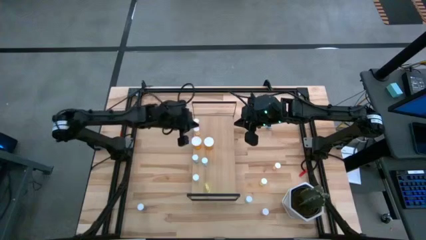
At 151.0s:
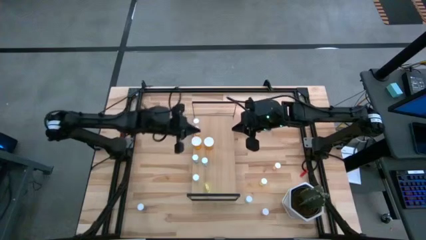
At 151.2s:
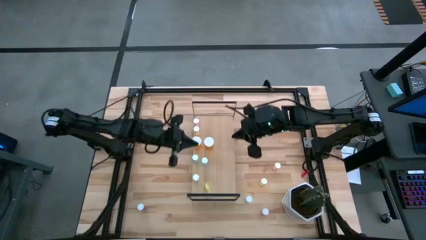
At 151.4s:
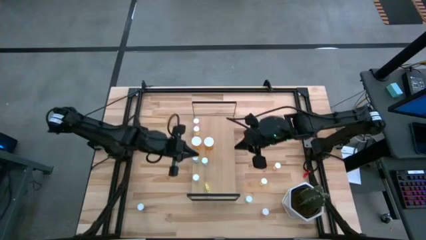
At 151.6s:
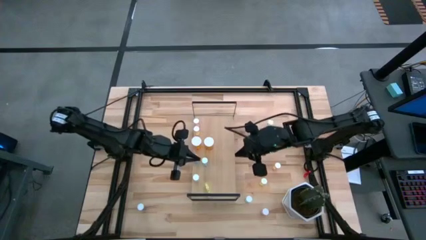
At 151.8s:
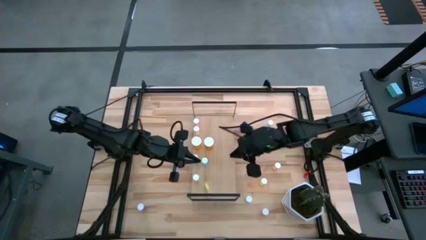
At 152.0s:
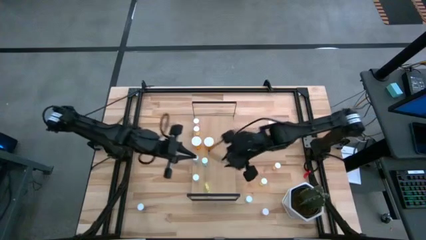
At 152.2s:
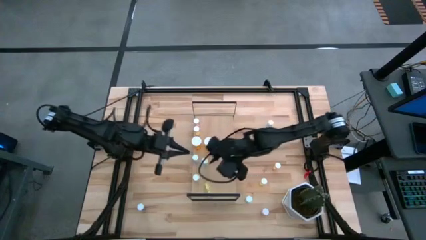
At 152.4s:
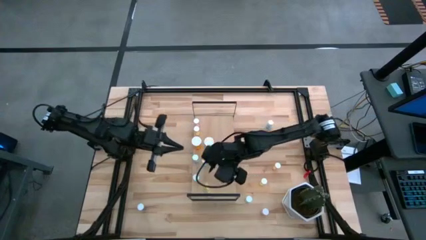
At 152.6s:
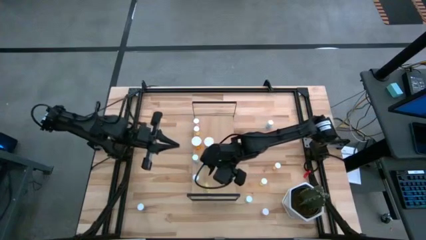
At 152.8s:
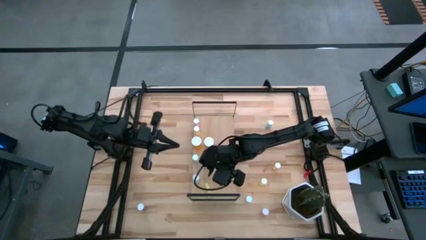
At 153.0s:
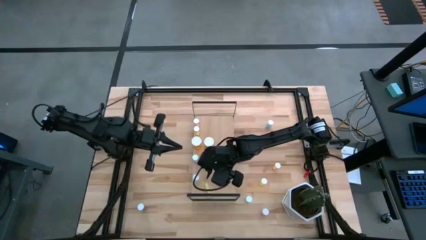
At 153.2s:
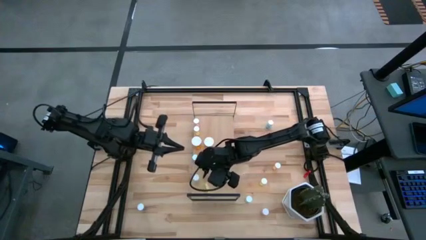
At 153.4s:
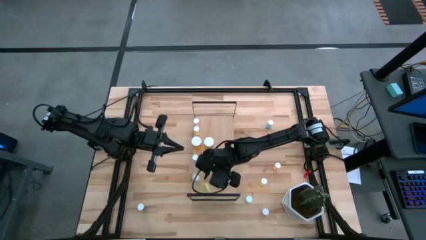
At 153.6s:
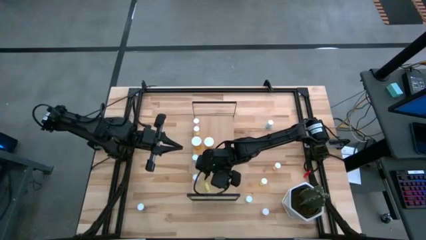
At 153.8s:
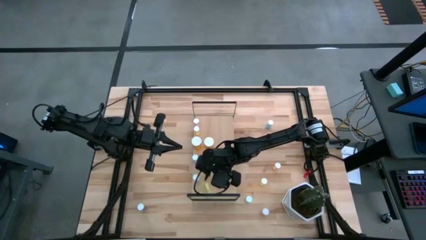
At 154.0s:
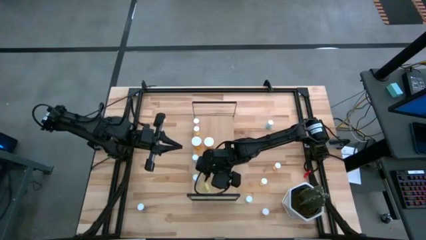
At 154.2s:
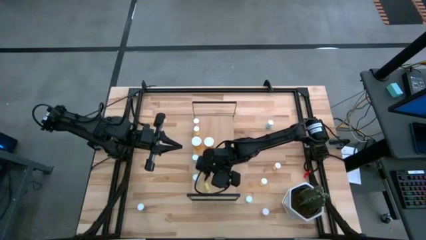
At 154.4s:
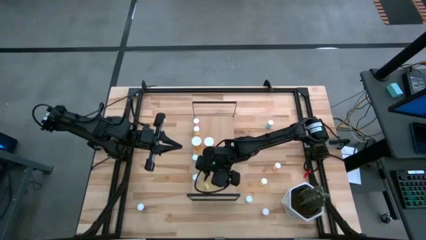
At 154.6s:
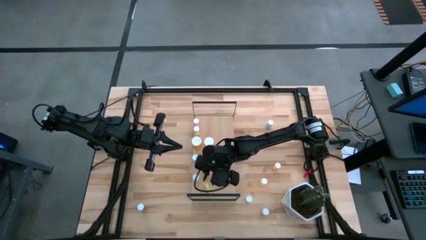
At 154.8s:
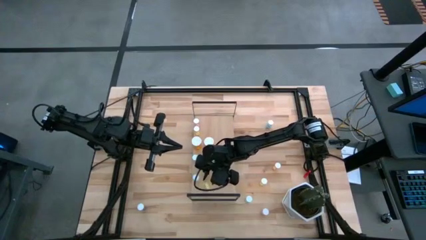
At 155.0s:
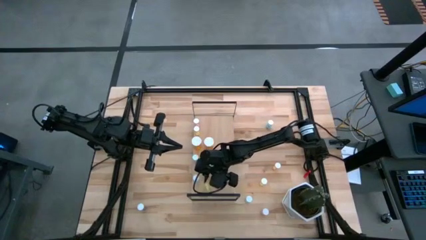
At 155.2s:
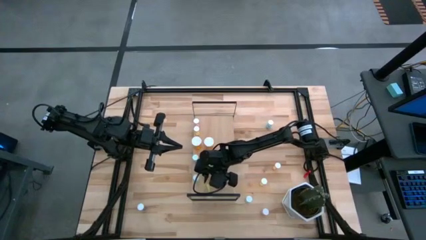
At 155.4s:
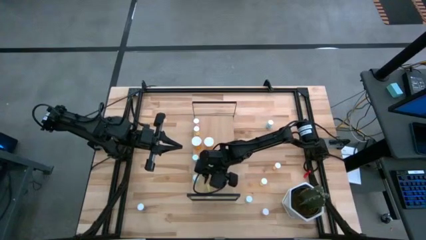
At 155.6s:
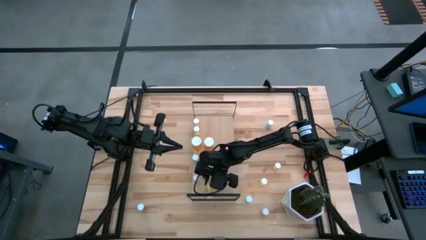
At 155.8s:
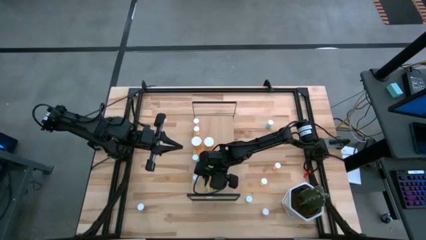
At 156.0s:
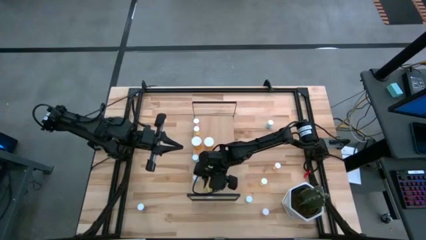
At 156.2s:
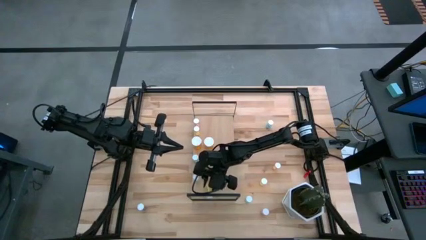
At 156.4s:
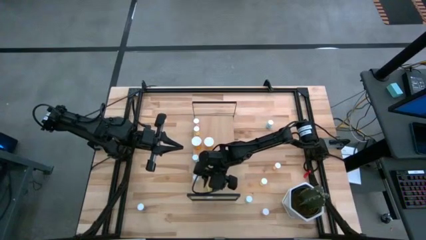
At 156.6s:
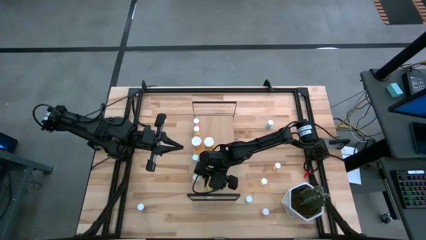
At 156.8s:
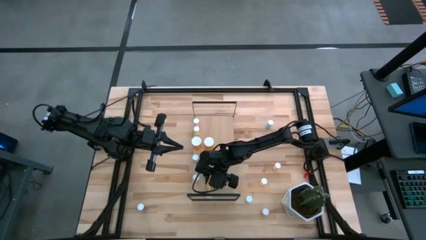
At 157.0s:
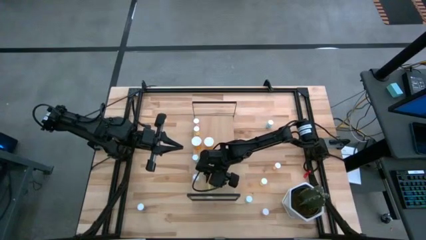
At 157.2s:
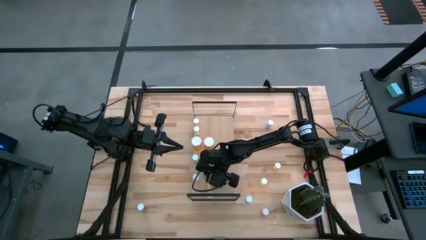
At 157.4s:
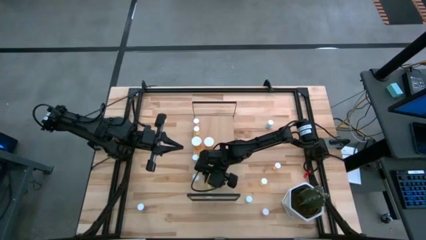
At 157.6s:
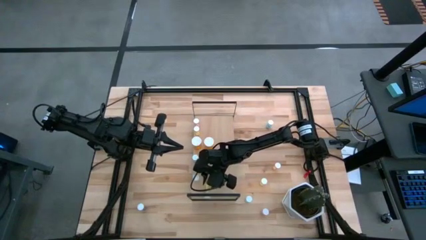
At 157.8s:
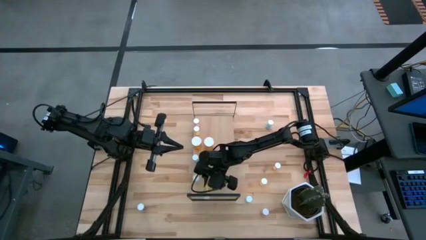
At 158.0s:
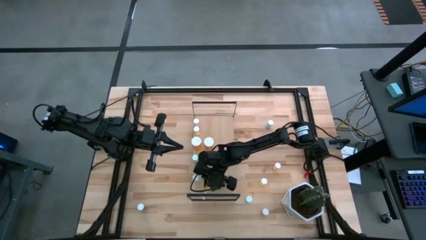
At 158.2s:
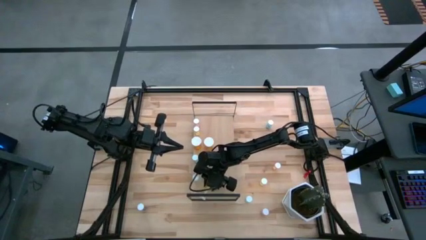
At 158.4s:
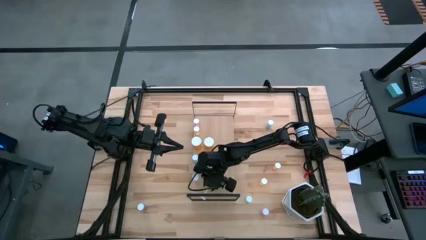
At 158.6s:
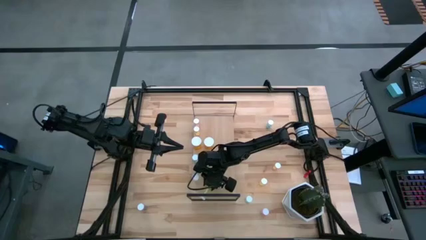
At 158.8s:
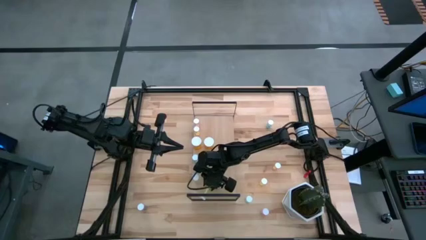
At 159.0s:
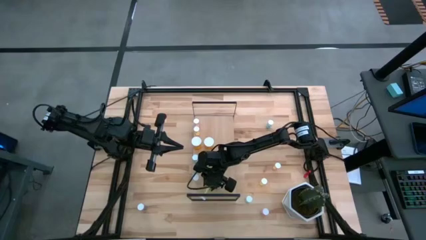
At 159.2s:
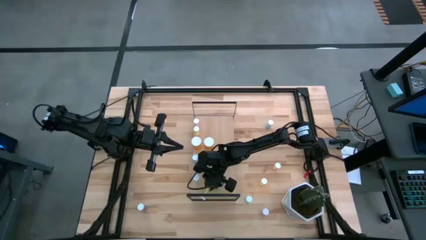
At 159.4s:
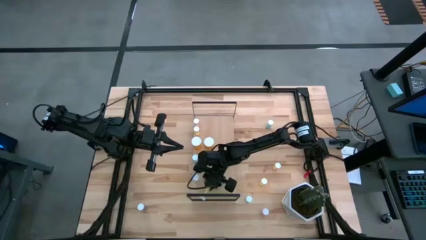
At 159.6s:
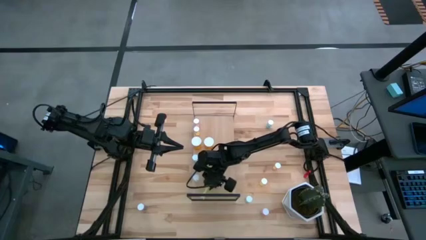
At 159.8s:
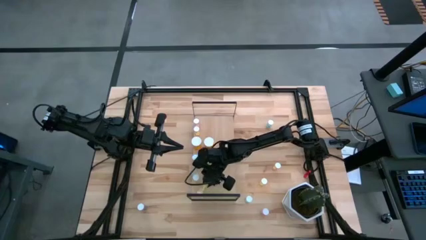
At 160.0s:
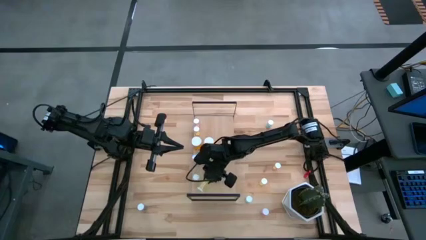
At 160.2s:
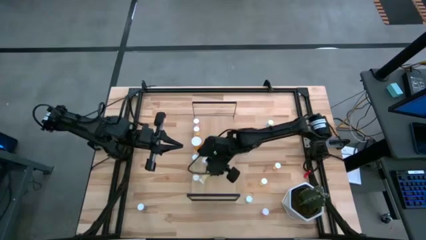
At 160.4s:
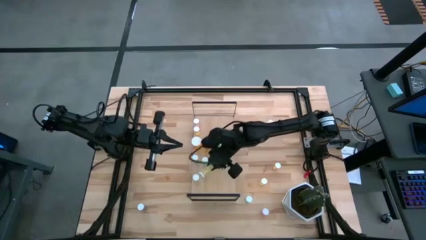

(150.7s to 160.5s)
Task: Pick and place medicine bottles onto shelf by color
Adjust the yellow pill bottle on the shelf

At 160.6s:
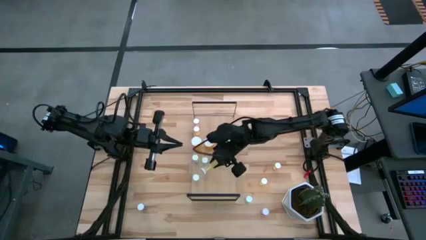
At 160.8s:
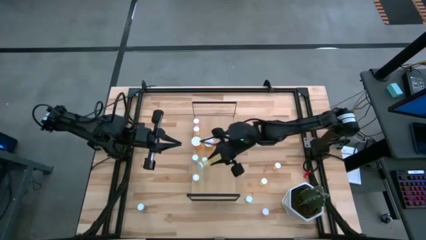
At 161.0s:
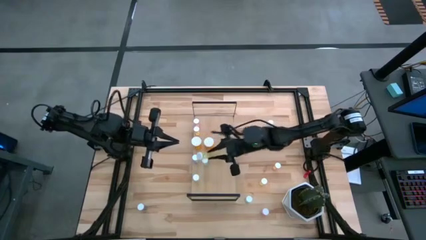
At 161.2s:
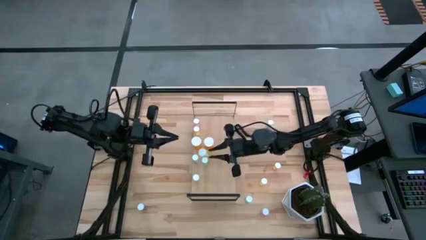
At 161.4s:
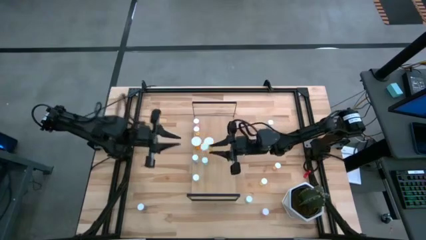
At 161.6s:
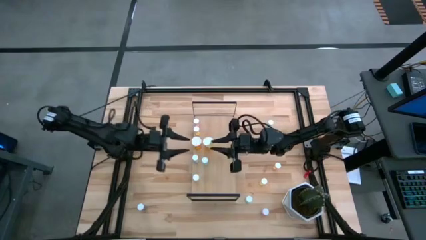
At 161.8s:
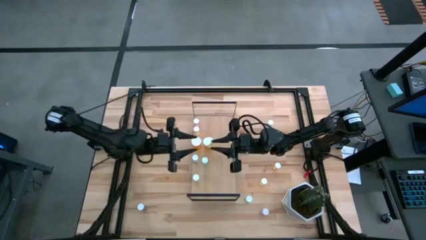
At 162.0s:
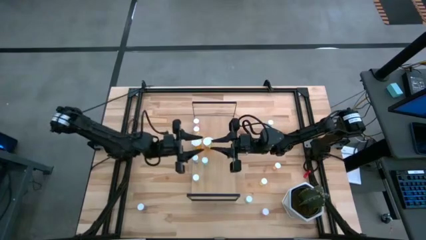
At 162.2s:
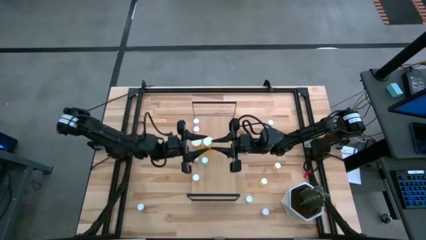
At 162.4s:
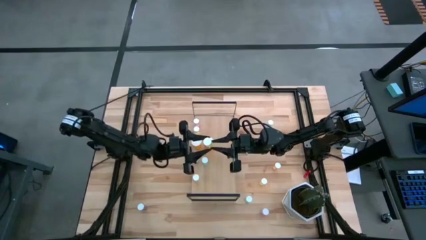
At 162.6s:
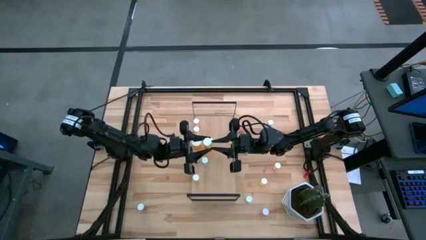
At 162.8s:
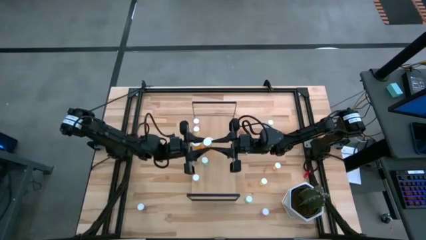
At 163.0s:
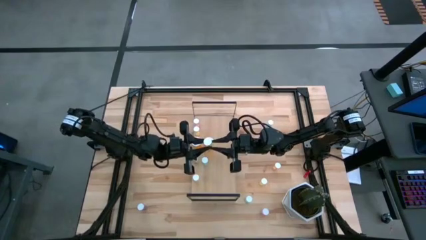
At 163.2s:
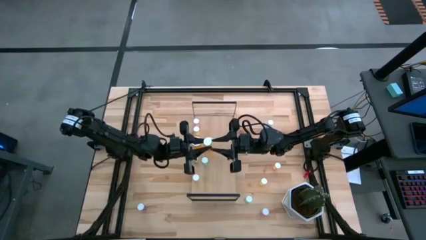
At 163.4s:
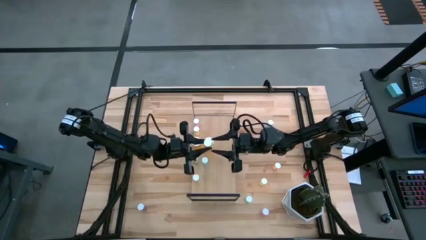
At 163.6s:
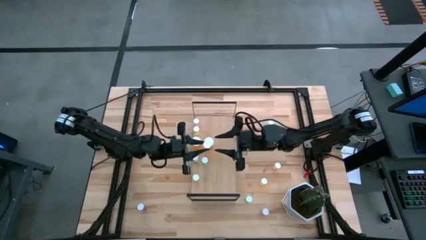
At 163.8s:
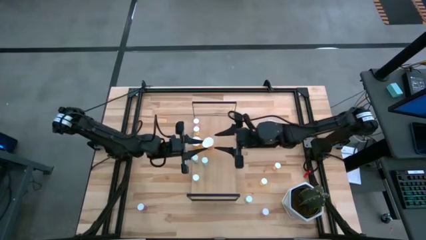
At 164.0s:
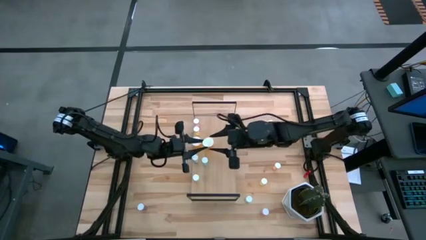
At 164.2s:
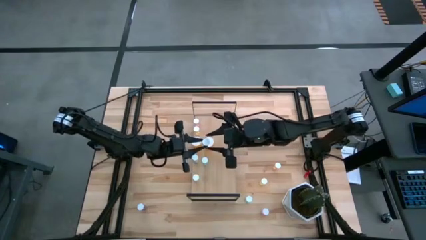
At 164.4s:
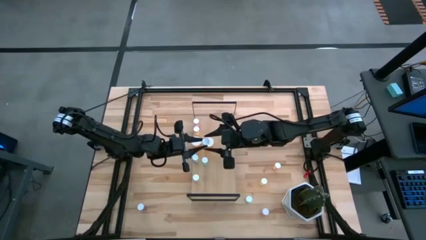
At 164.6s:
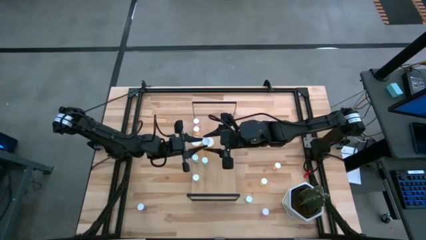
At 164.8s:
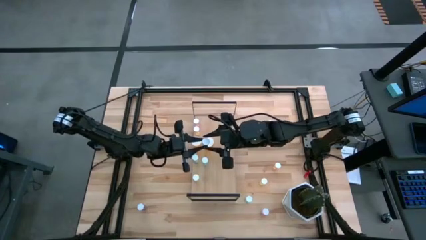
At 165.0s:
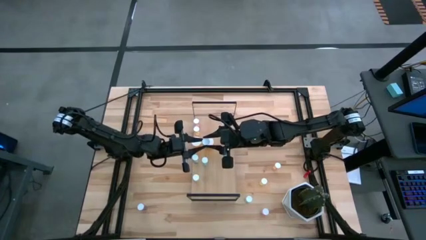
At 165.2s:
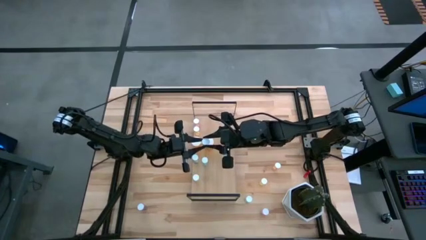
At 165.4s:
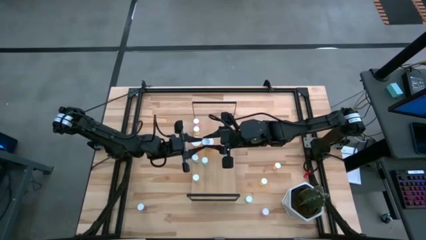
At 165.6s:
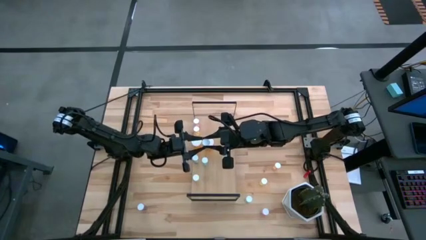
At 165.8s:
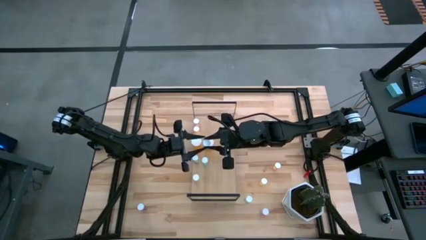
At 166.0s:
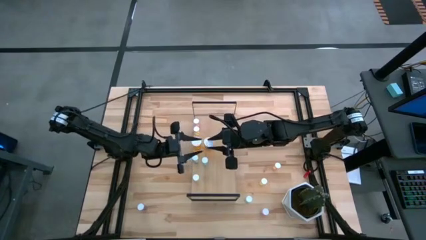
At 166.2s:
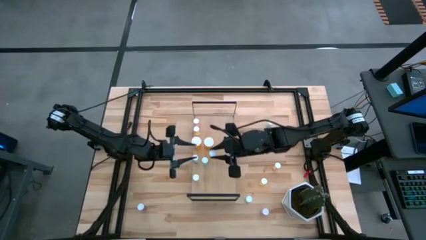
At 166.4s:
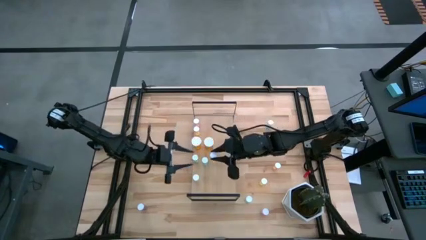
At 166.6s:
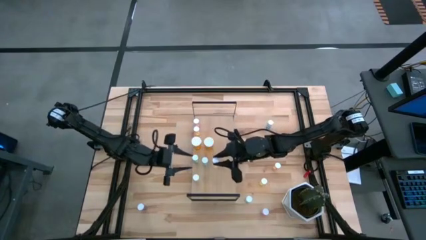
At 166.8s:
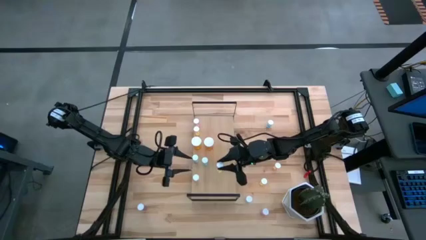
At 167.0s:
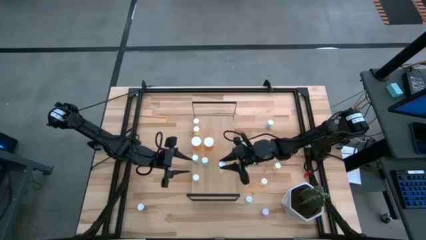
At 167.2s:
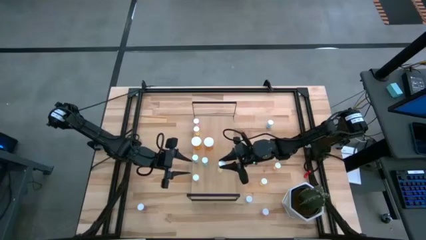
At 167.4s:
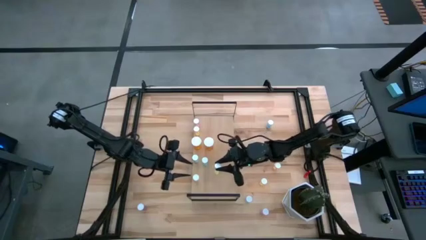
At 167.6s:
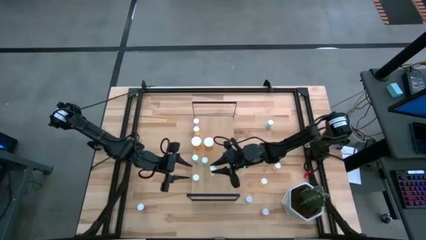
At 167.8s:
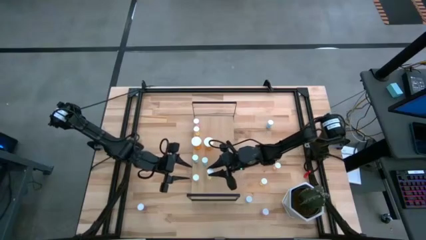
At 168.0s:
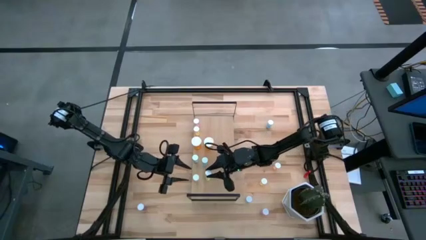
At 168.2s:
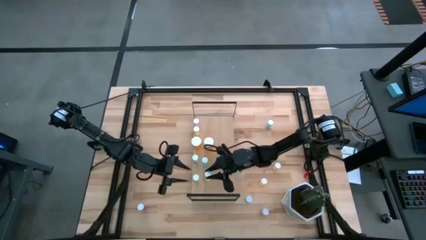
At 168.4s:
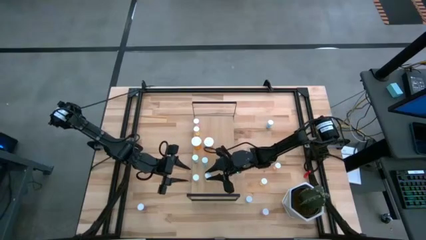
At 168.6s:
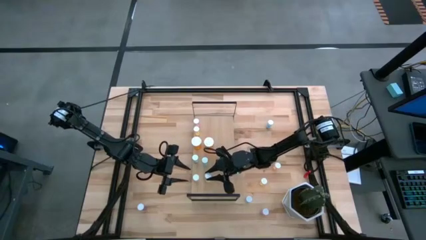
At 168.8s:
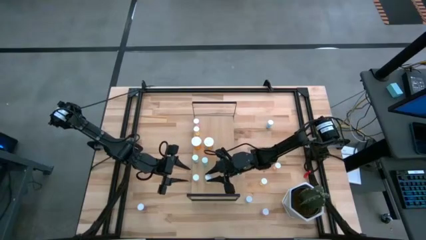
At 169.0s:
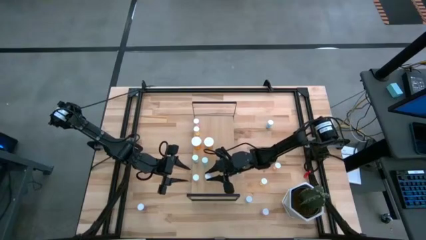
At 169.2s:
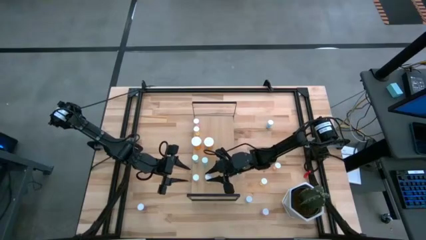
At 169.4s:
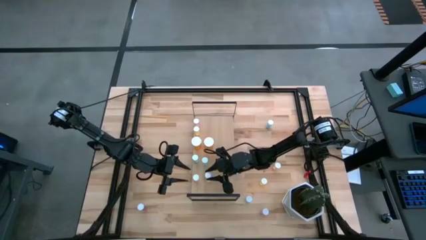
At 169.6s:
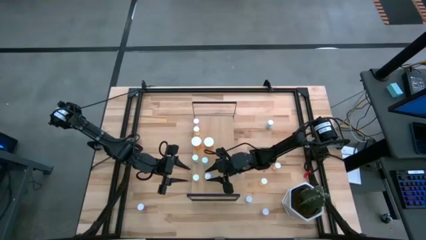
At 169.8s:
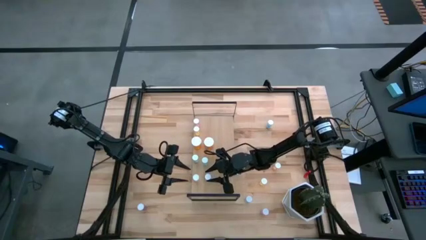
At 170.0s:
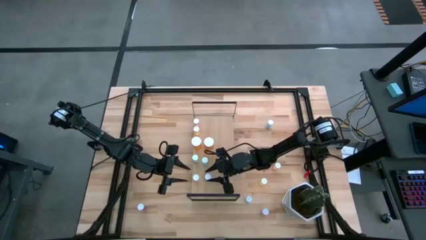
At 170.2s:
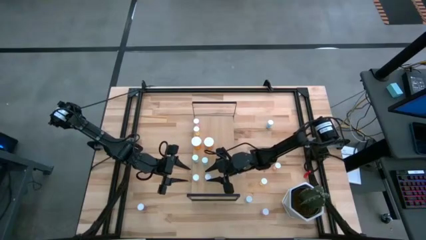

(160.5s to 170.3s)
Adjust the yellow pill bottle on the shelf
